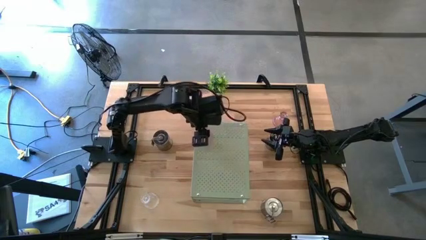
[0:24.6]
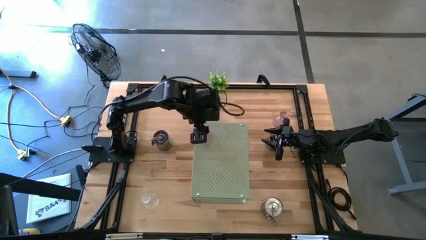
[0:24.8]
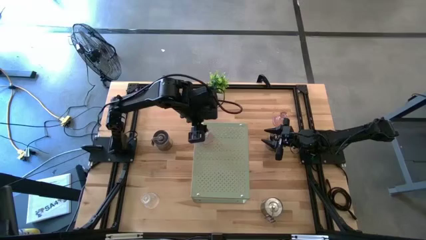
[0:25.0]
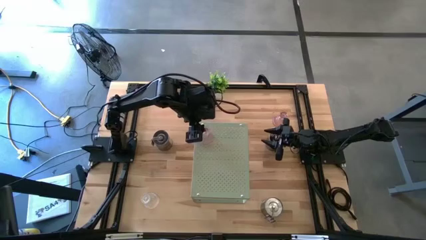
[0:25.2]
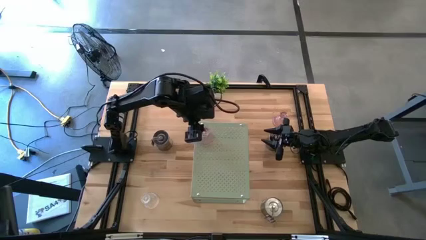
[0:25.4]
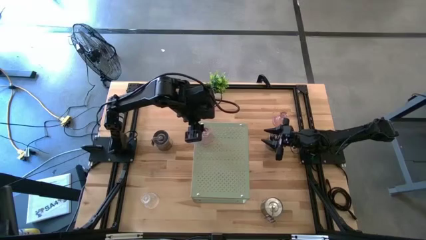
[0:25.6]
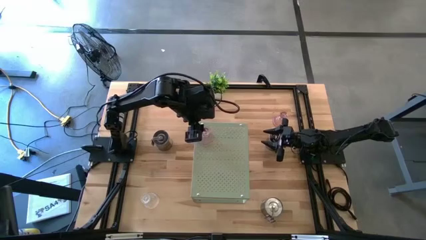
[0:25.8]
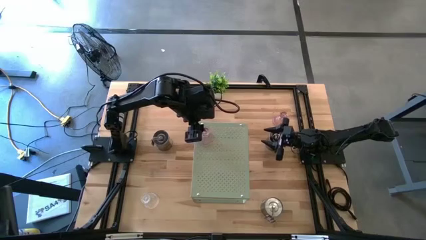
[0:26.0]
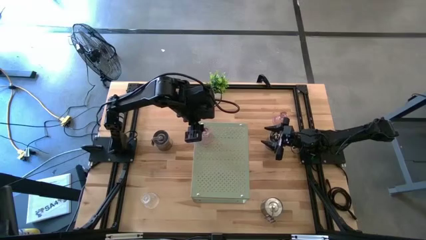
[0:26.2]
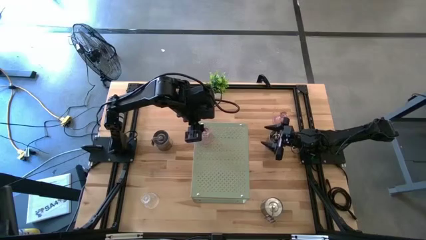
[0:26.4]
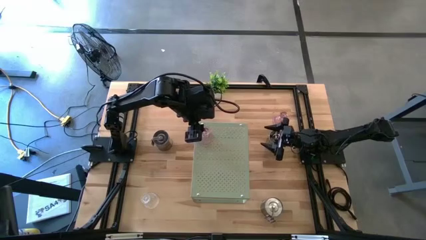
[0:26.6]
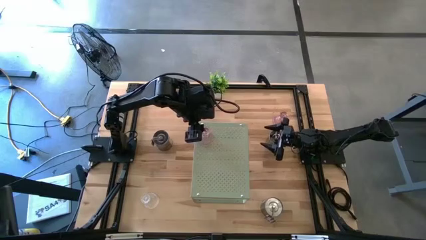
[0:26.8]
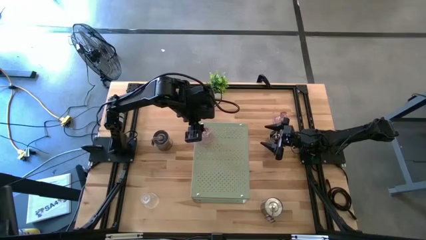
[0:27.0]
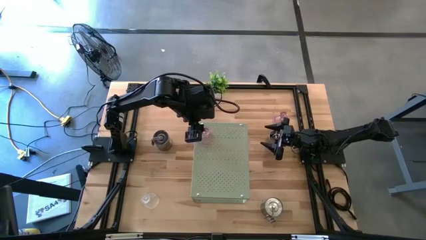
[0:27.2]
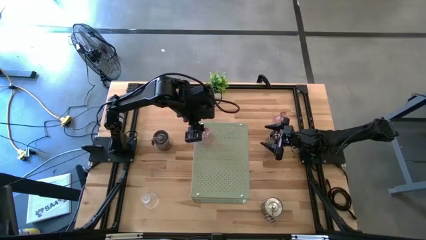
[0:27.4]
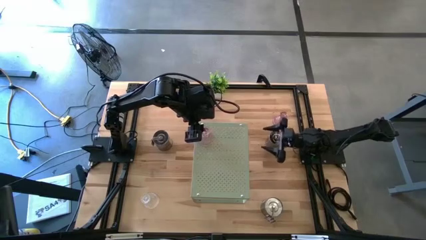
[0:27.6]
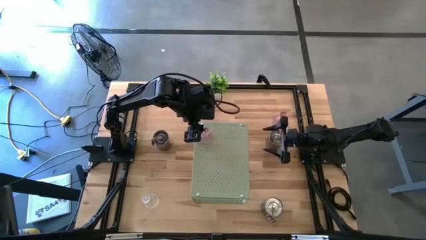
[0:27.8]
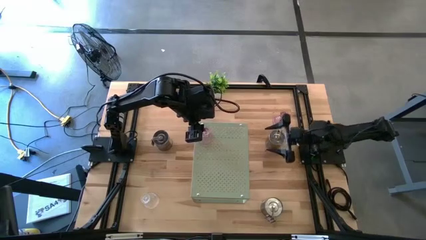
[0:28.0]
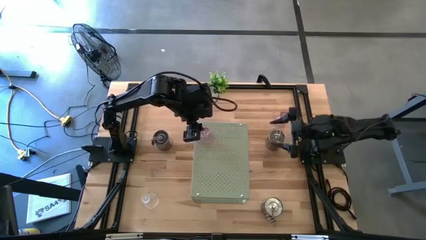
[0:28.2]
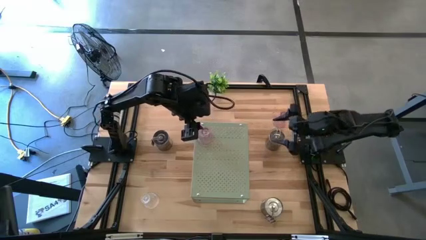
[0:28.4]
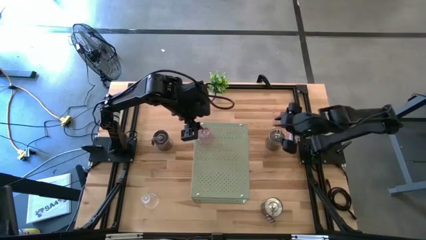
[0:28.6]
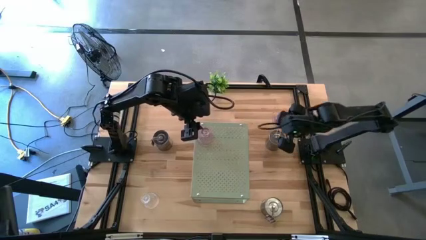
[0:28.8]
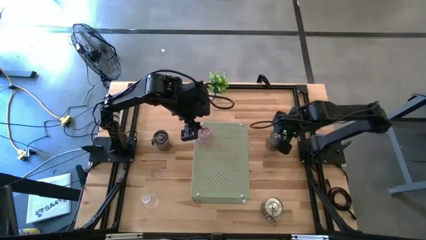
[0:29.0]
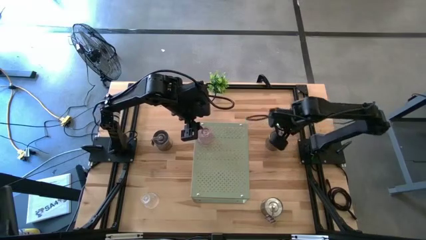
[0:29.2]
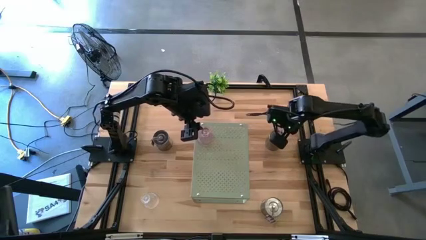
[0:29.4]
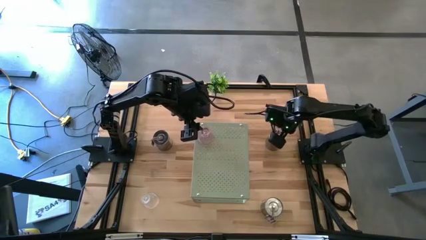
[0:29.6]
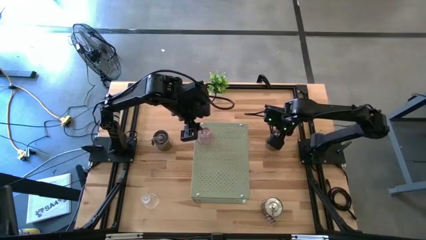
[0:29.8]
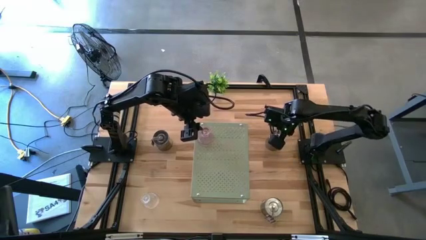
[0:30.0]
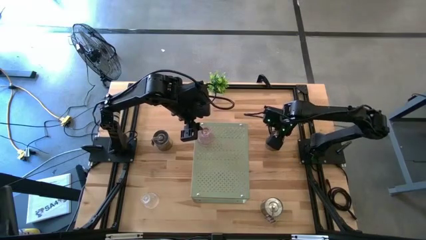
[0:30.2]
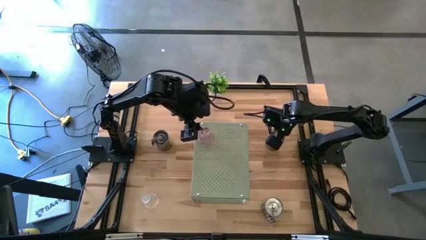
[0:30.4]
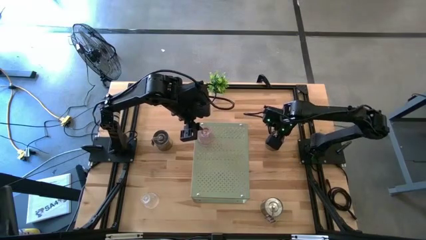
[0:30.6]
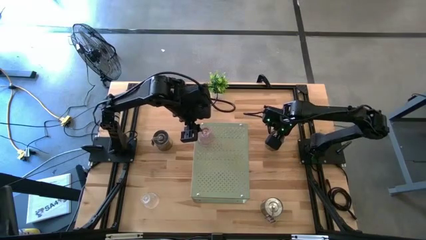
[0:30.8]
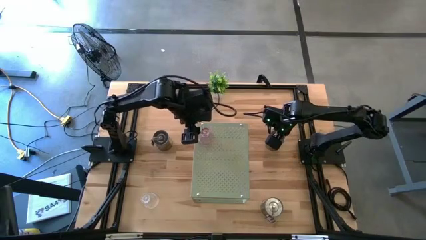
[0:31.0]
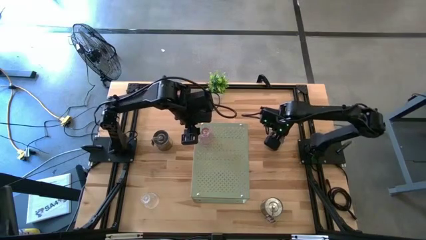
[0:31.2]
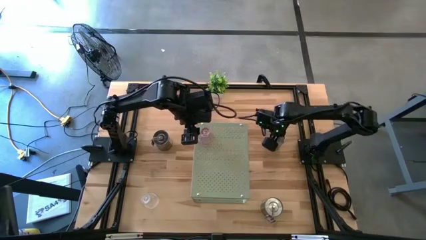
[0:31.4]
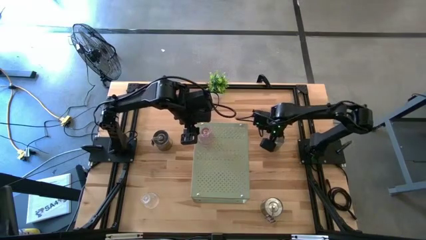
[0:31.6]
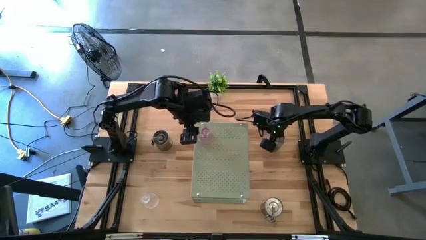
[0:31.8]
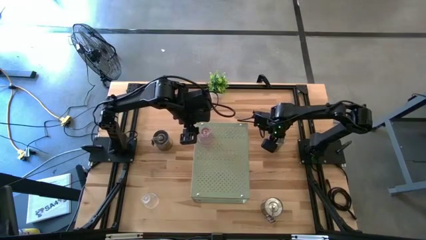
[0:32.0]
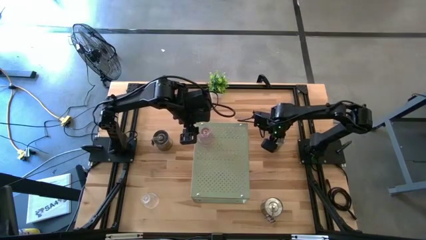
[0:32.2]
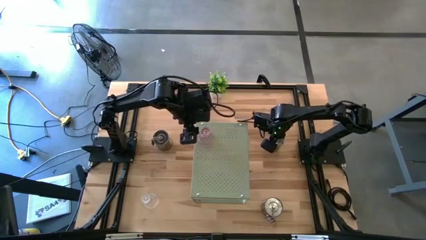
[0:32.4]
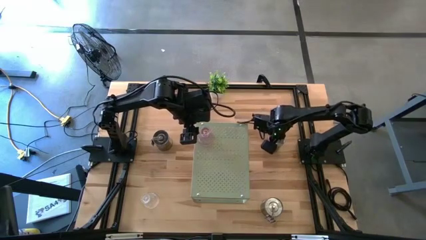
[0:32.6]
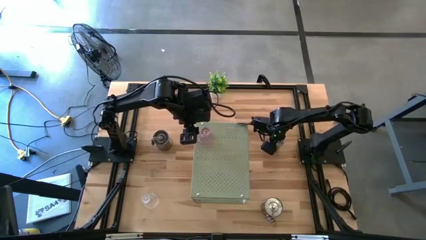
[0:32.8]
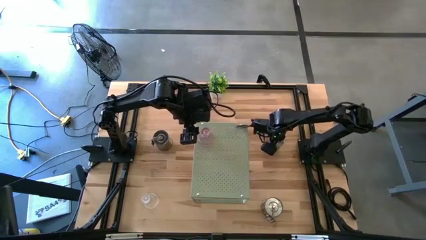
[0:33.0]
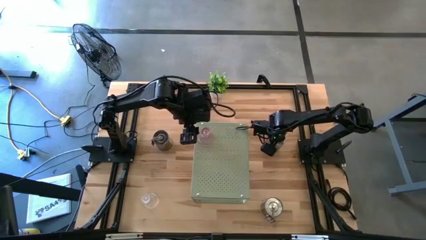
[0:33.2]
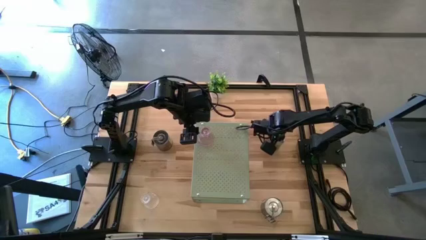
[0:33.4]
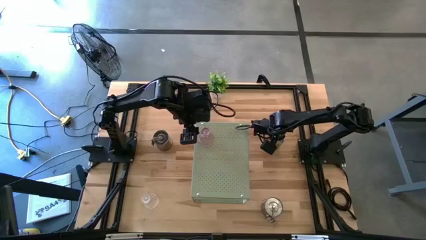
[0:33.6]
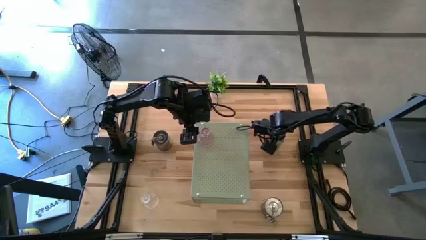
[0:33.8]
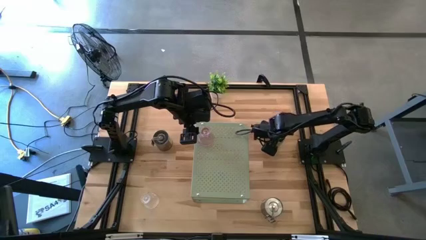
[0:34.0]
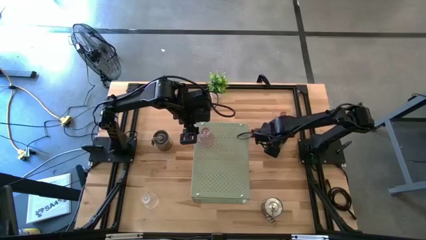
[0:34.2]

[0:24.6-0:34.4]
Task: Pick & Place candle stick holders
Put the top right silver scented candle on the shelf

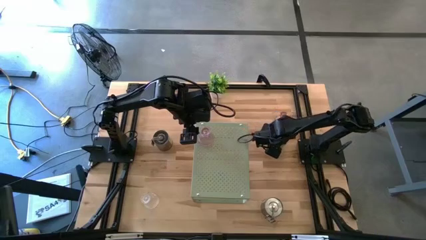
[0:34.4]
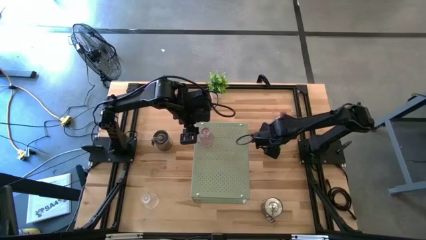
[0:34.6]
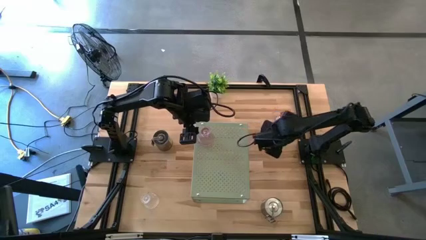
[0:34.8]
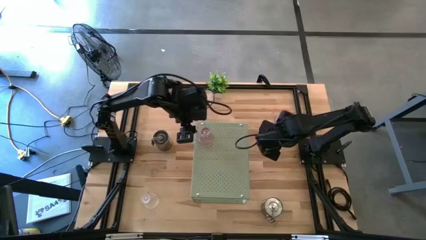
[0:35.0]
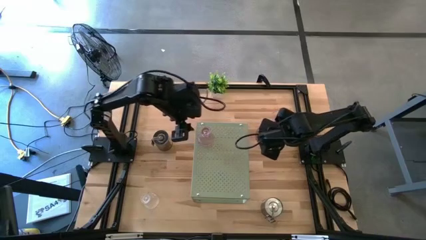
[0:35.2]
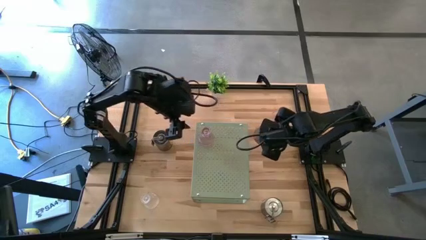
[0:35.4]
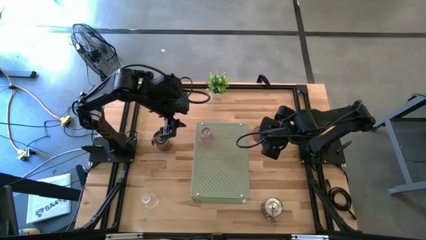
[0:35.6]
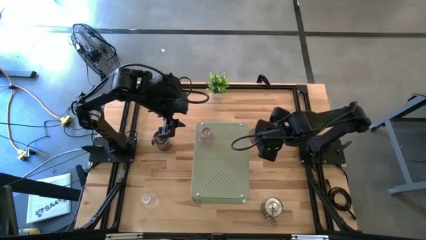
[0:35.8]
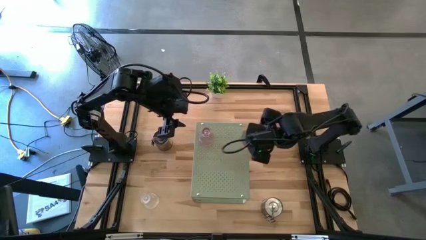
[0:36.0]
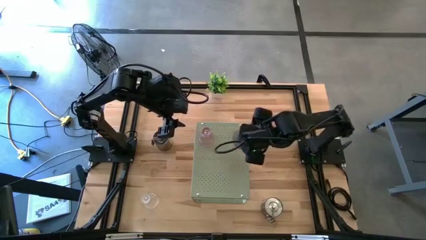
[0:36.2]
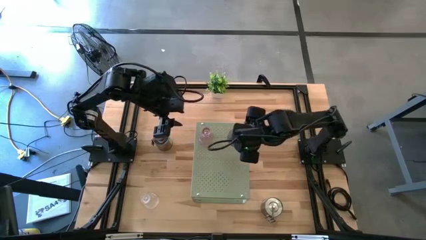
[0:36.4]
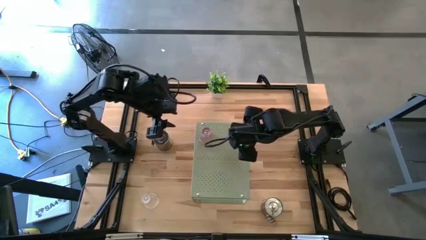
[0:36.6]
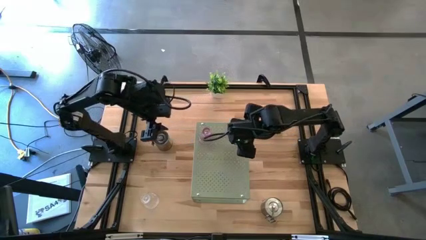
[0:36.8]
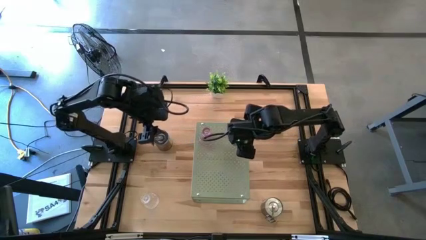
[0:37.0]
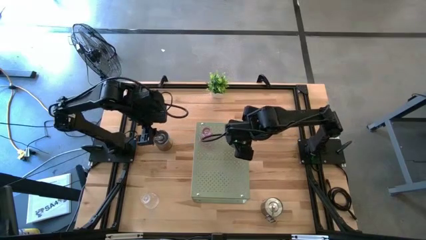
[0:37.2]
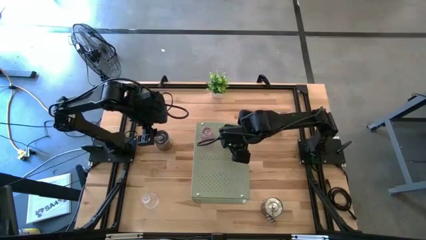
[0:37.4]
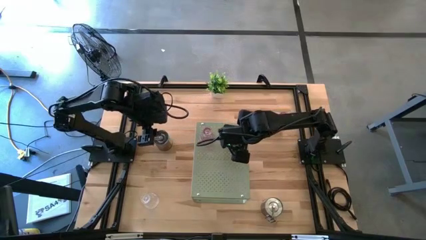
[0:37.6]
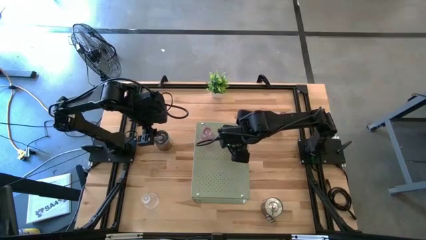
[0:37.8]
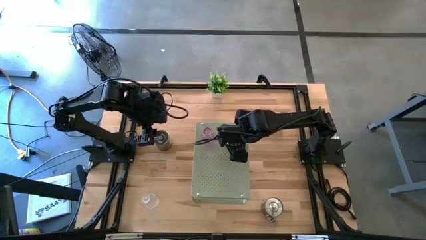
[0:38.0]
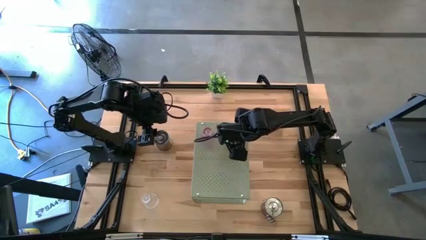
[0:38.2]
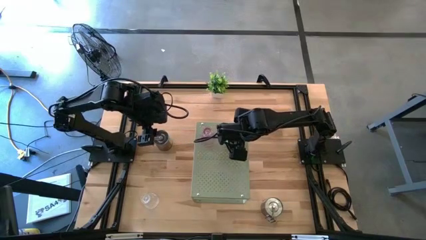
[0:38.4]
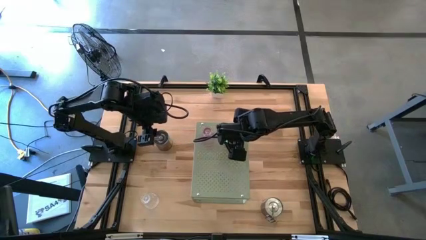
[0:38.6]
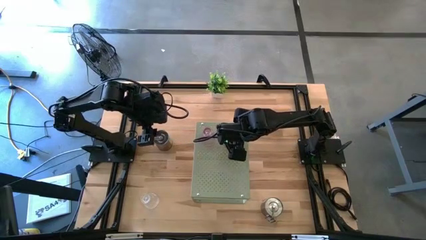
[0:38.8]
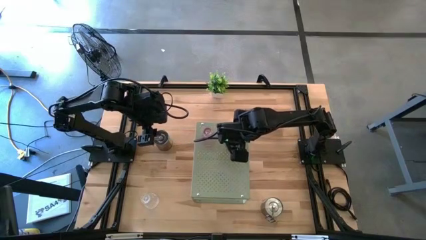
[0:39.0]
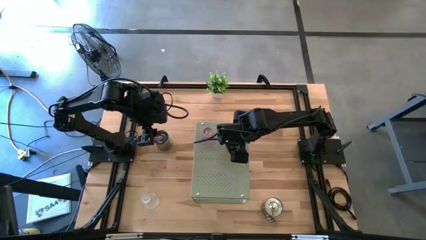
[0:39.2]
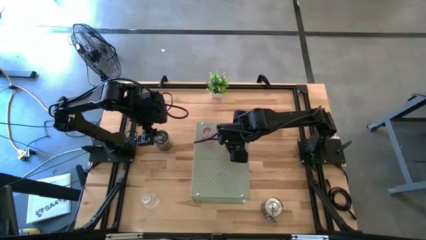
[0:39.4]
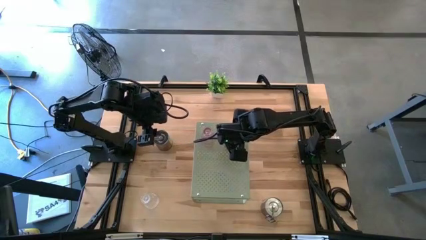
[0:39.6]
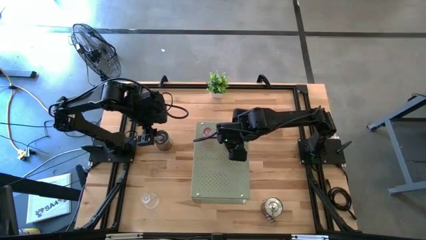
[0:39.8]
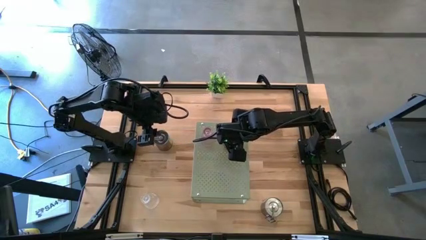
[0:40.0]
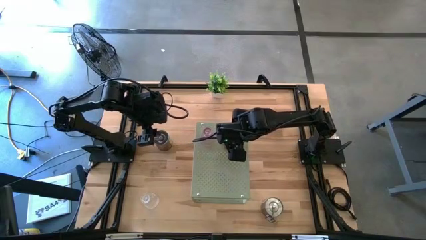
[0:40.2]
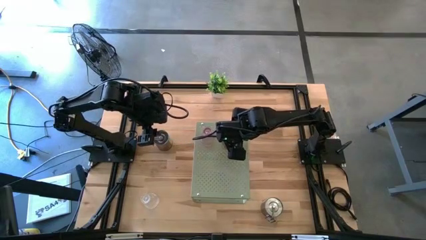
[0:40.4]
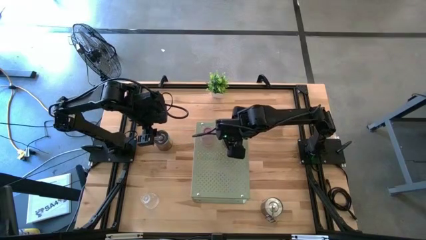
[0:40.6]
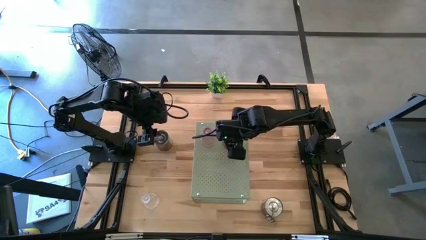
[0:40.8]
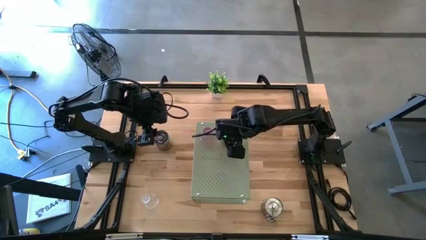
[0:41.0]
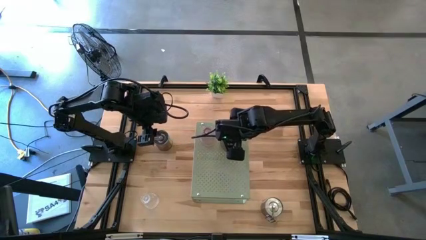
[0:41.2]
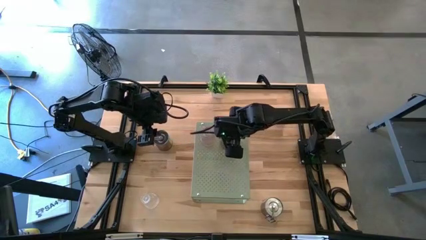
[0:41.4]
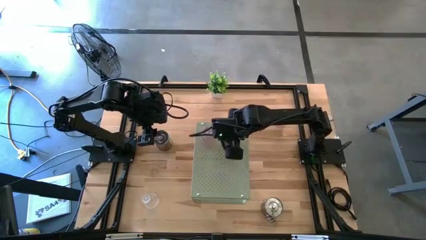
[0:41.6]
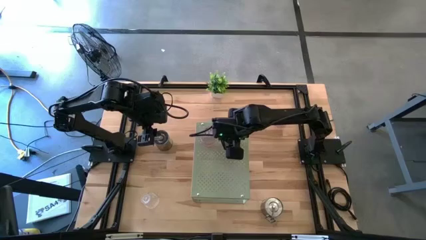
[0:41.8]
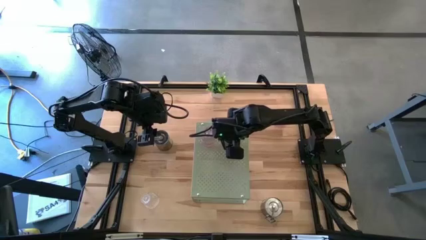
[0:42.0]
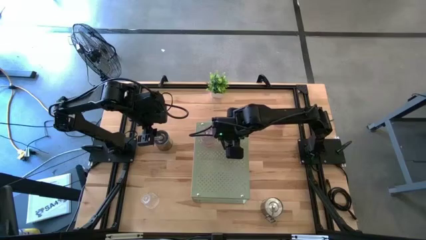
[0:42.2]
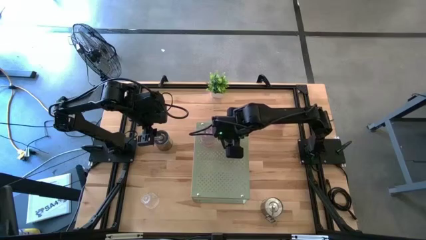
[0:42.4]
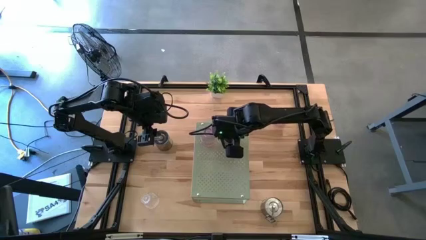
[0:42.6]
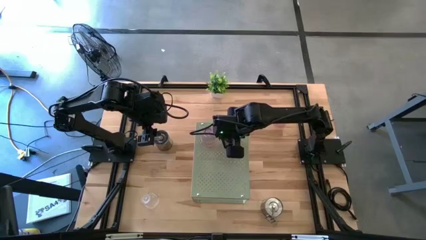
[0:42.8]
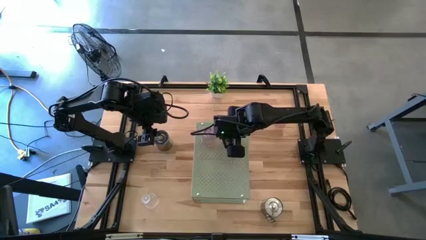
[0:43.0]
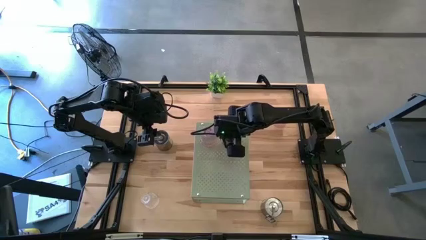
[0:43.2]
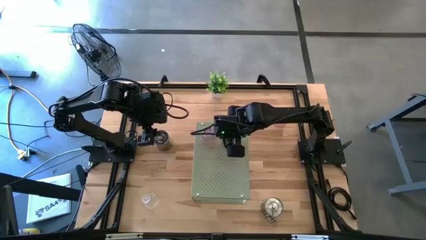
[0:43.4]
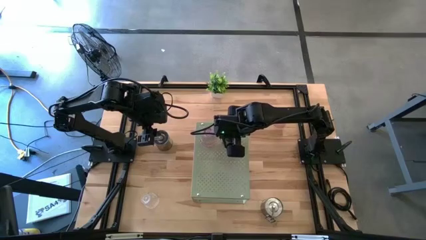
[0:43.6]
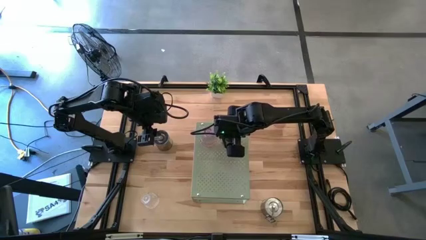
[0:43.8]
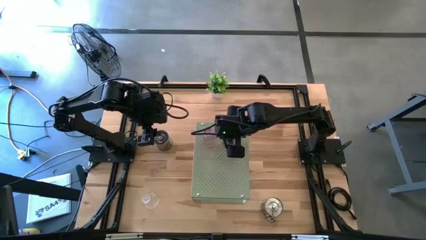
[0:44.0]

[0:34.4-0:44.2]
Put the top right silver scented candle on the shelf
